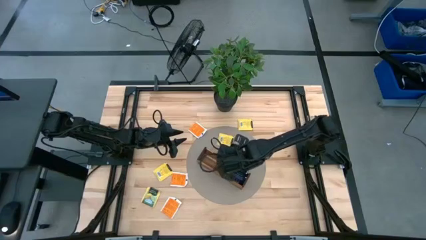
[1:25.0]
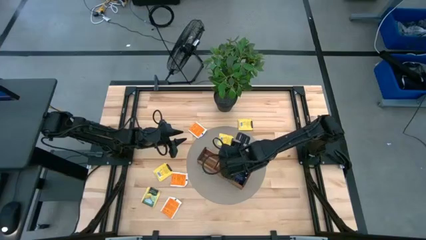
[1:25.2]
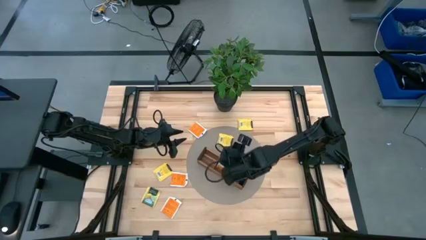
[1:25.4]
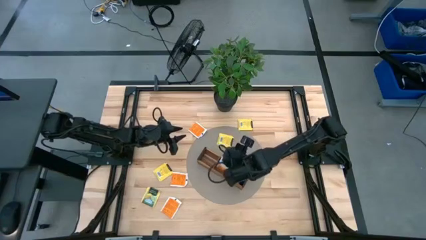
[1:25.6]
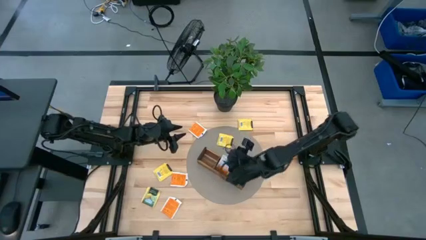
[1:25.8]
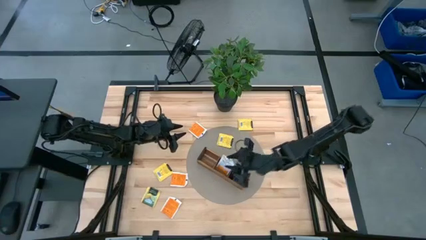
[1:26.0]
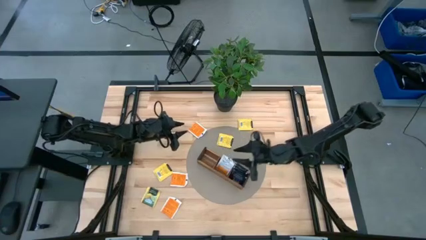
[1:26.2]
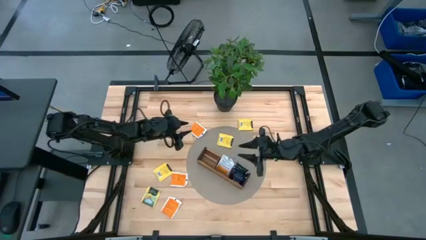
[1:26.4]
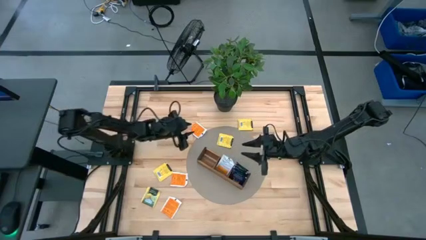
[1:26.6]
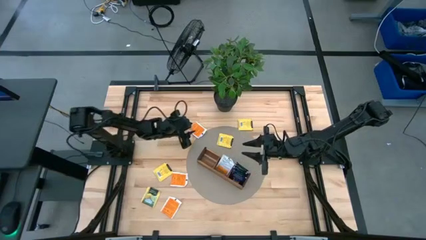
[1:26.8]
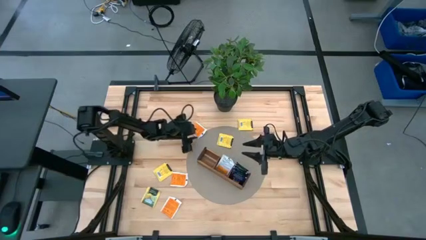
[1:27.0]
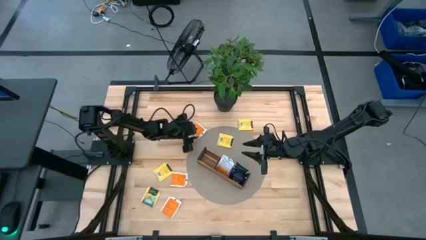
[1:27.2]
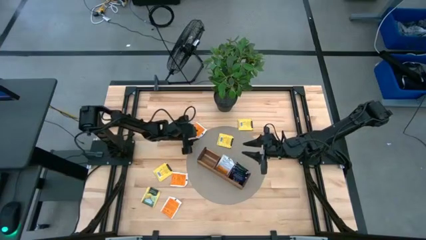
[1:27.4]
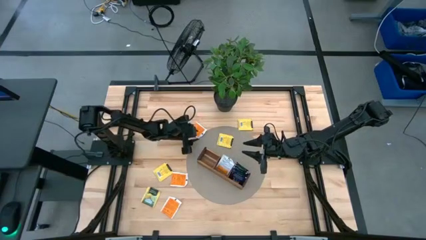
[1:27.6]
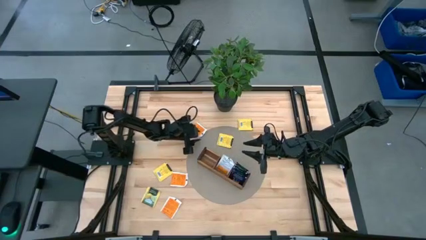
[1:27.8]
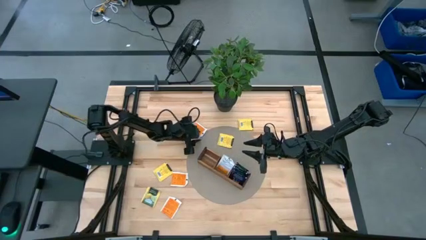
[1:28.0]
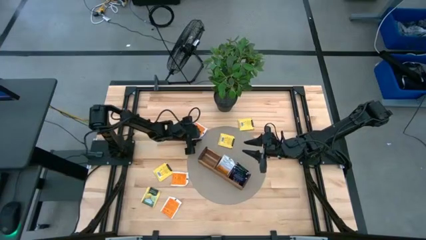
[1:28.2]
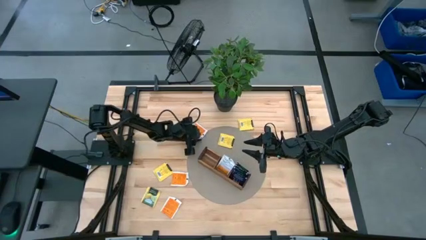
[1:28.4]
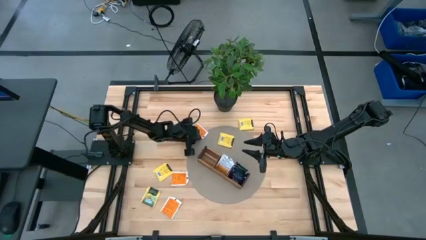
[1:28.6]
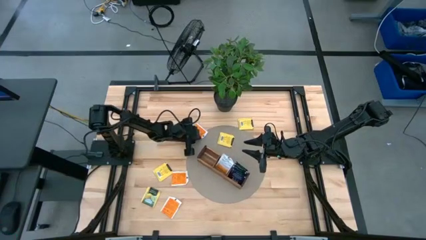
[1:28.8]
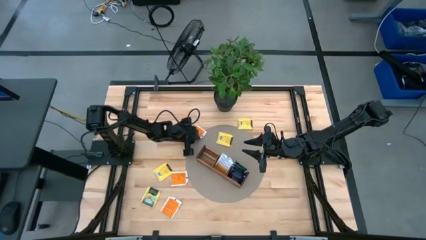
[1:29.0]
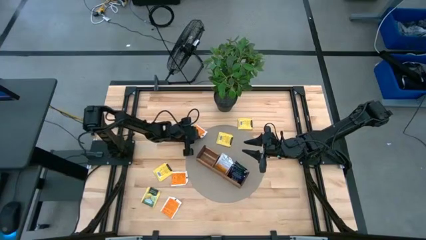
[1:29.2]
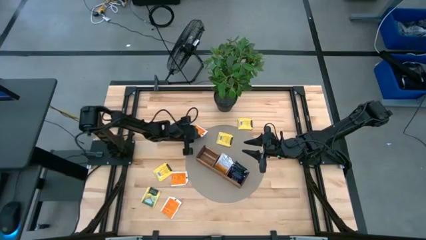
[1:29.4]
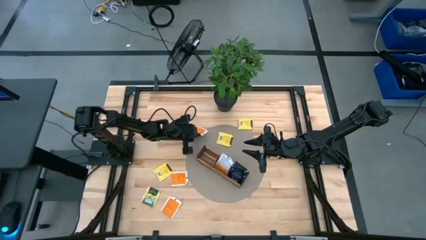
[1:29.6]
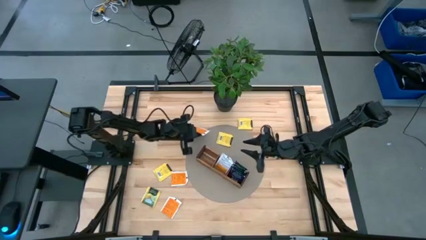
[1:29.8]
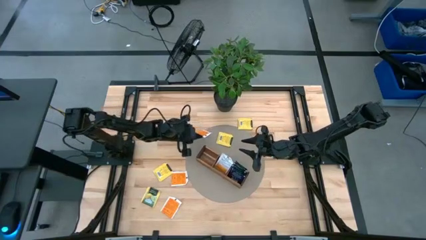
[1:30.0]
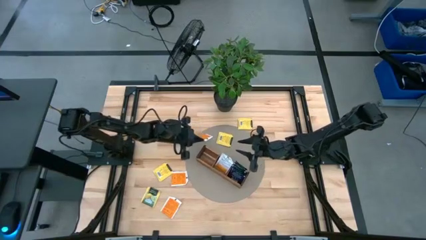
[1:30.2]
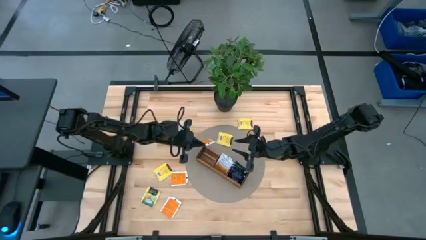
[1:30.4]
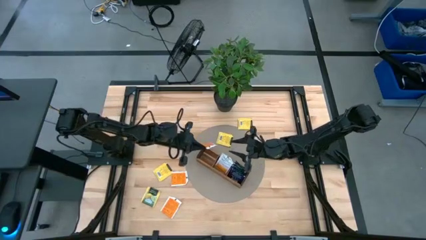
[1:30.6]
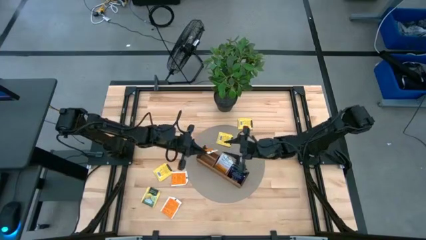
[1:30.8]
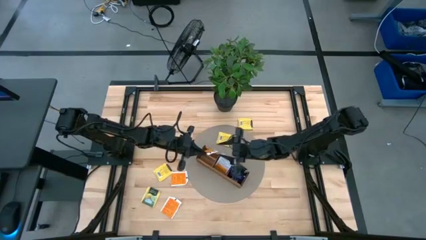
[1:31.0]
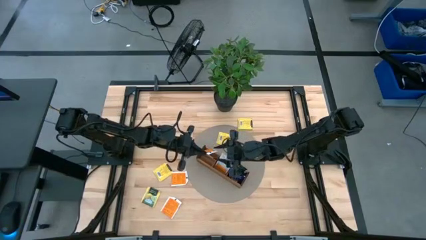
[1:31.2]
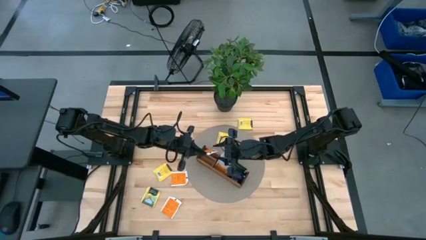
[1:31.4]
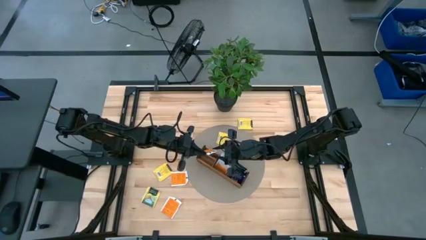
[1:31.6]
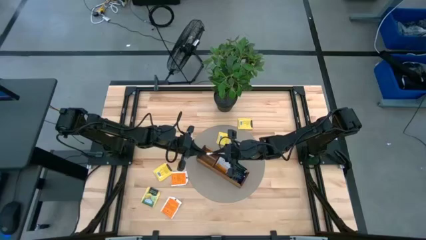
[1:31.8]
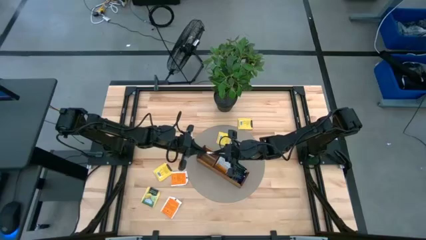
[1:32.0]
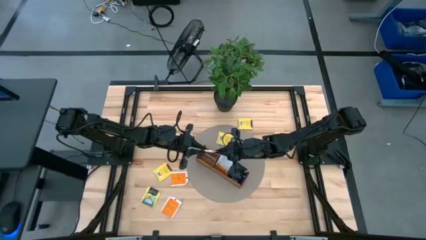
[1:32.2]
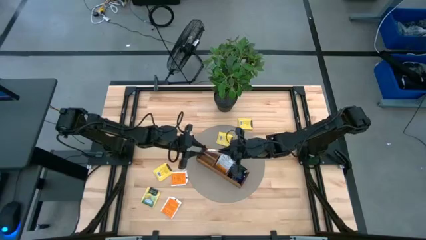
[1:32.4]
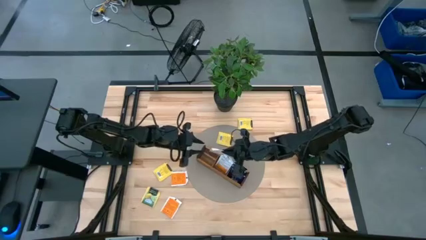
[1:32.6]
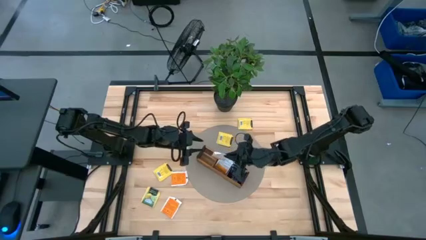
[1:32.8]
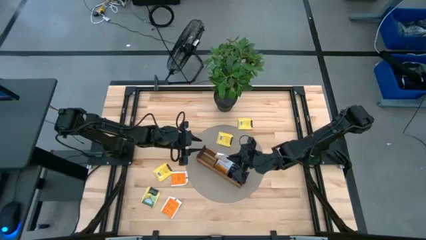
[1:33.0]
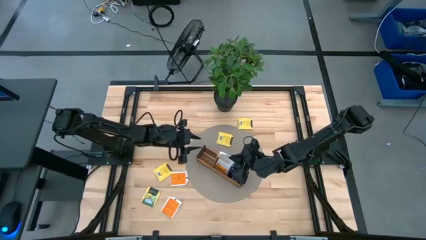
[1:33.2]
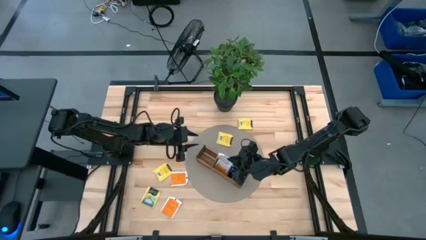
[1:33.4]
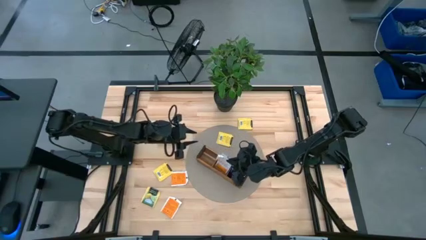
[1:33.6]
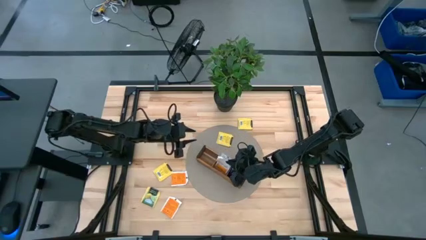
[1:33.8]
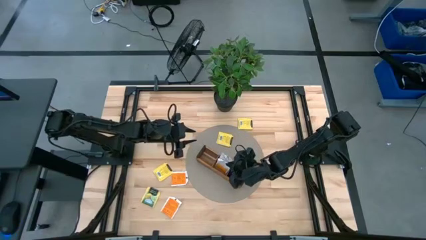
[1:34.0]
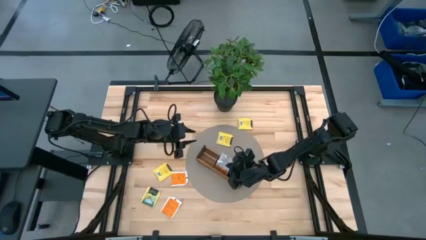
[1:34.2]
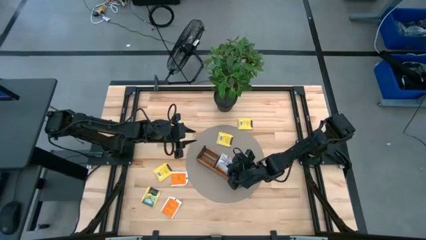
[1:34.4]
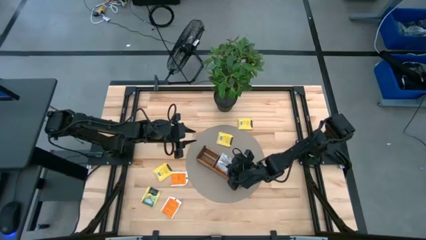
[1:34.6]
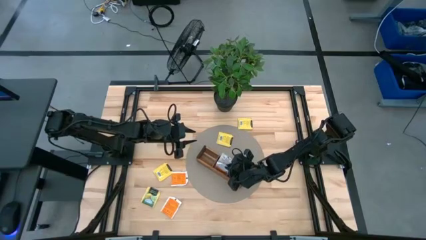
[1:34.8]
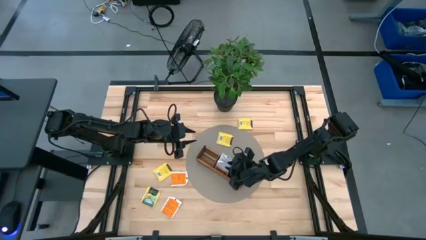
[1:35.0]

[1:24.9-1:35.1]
Task: Pick & Place Tea
Put the orange tea bag into the middle section of the wooden organizer

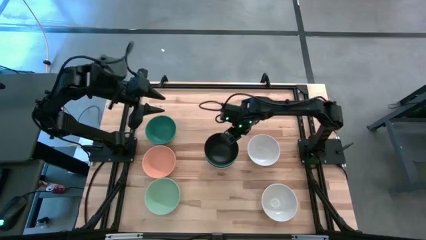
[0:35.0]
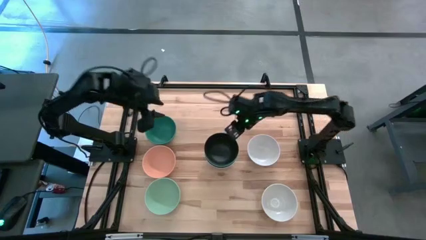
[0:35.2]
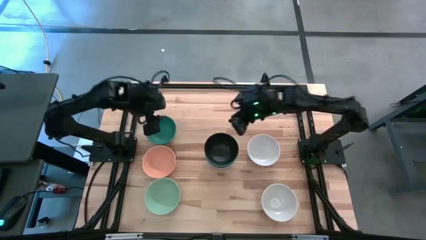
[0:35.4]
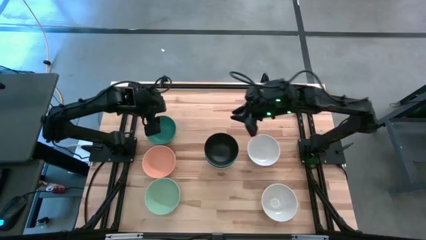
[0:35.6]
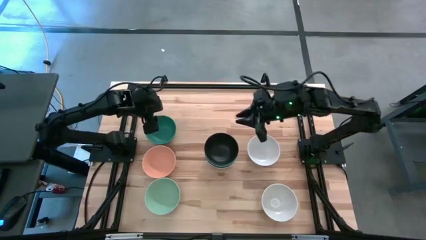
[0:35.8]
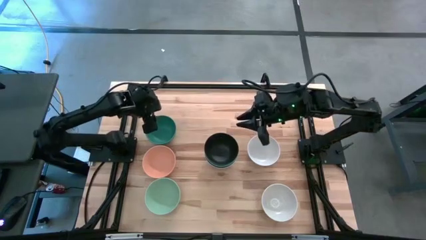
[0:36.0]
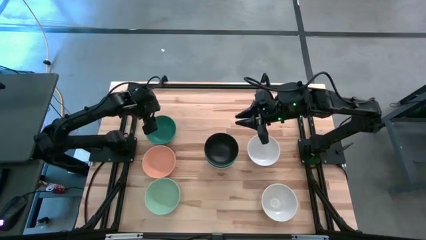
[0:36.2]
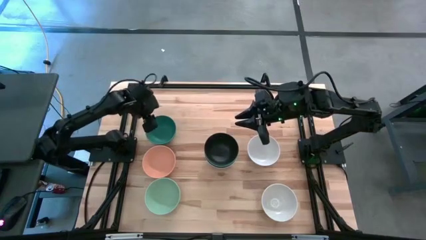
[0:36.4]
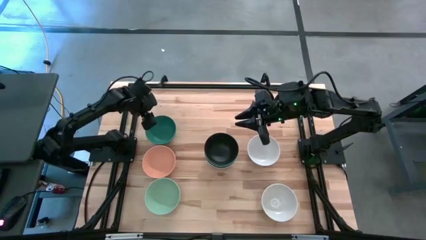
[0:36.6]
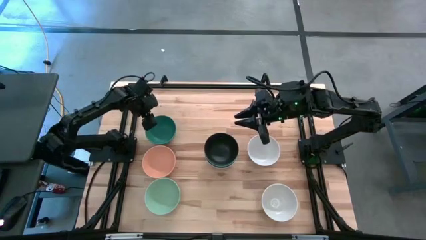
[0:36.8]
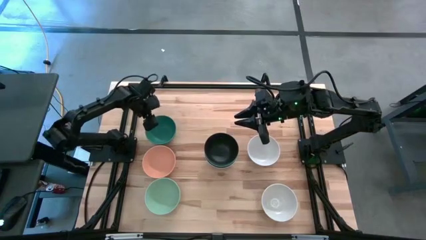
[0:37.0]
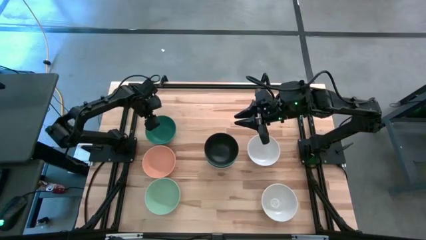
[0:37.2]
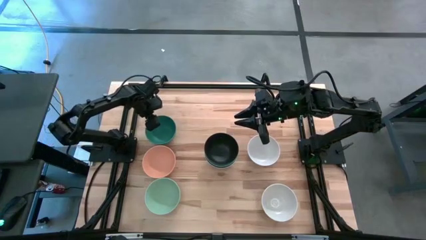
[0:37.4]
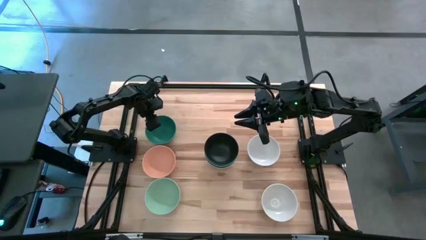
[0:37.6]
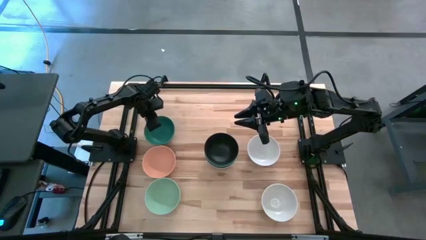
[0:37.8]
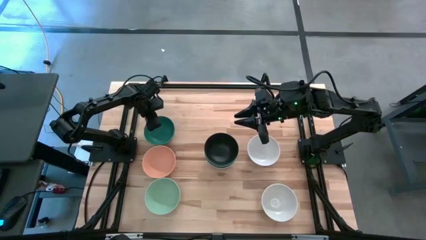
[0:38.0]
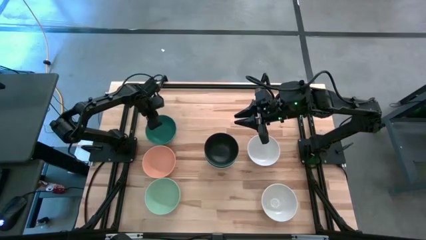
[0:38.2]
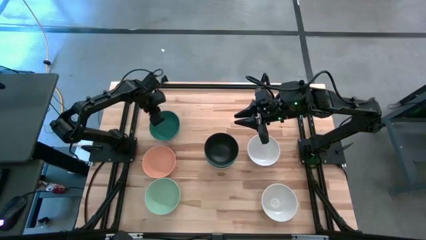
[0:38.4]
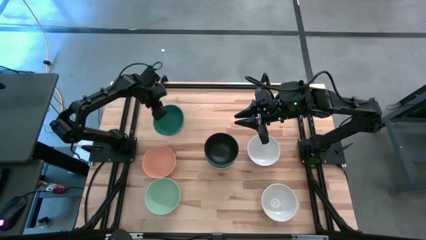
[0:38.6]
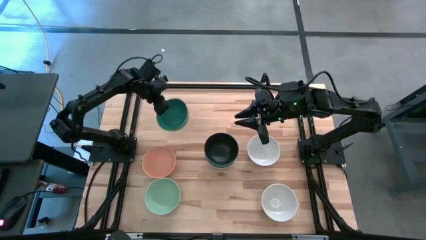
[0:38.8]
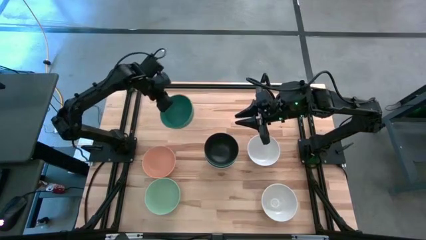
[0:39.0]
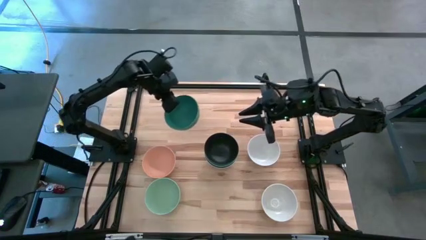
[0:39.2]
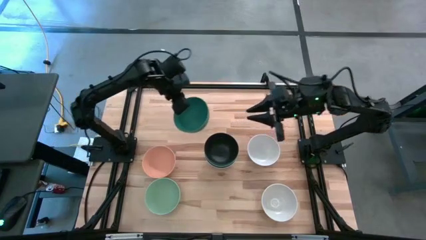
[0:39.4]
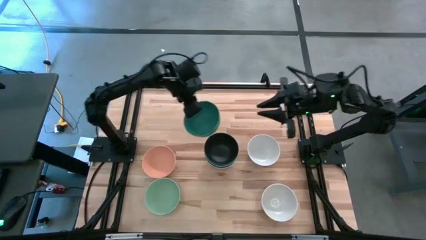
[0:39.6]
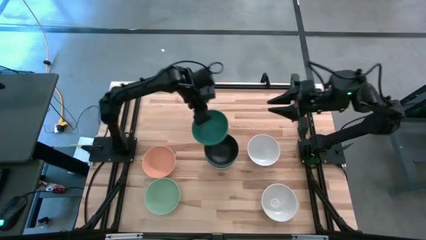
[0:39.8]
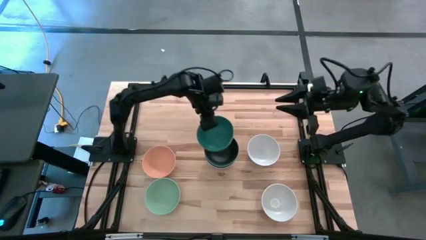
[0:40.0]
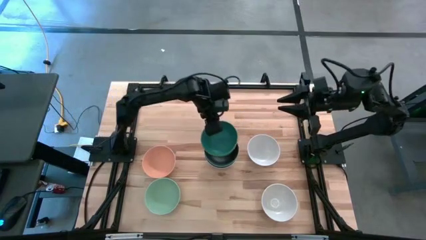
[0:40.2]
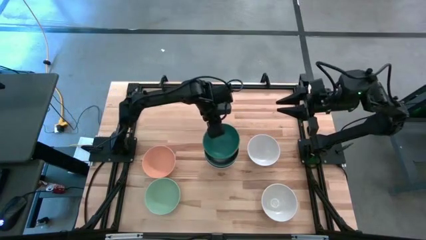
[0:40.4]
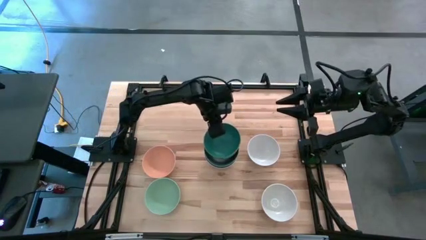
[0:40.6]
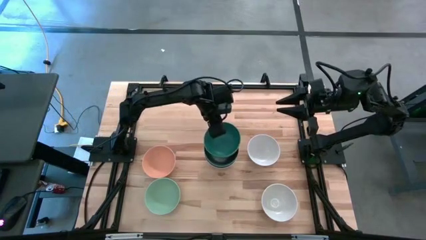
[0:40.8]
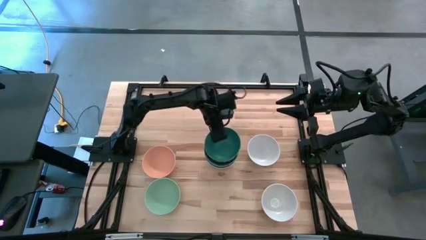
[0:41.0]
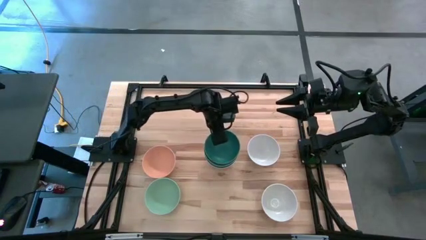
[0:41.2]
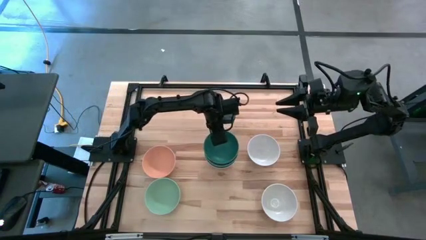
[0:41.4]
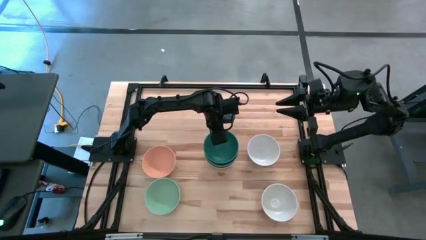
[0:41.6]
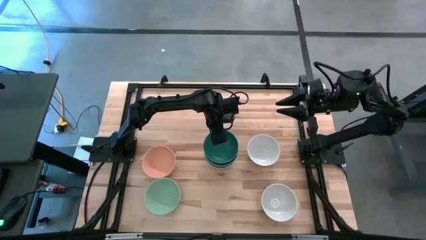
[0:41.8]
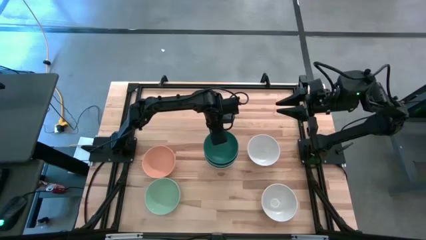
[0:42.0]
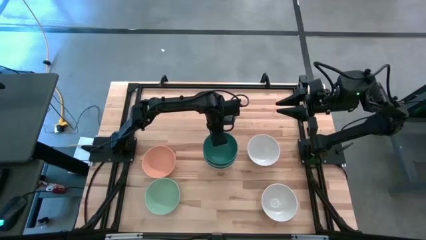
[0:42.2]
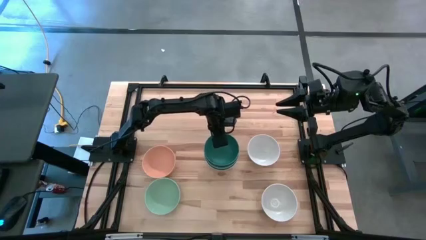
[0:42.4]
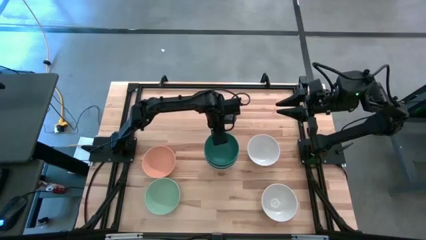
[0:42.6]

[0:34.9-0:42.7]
Task: Nest bowls inside each other
Stack the dark blue bowl on top of the black bowl
